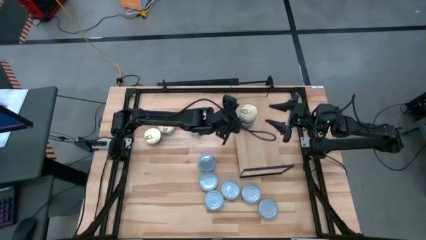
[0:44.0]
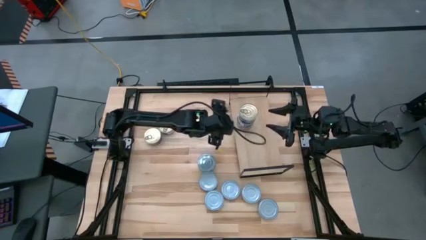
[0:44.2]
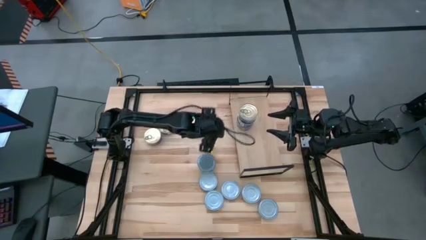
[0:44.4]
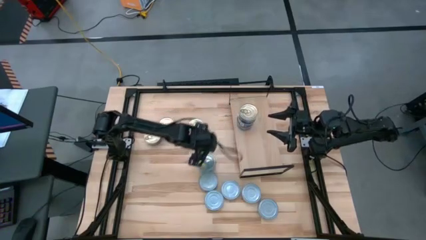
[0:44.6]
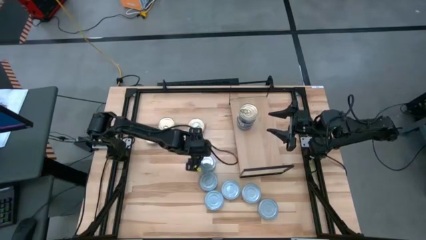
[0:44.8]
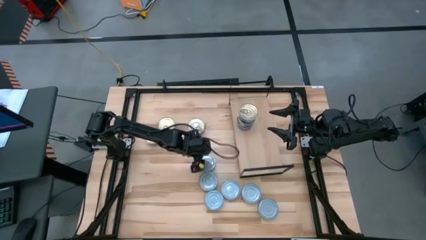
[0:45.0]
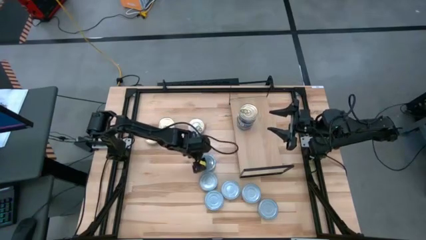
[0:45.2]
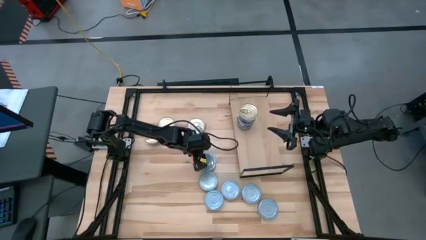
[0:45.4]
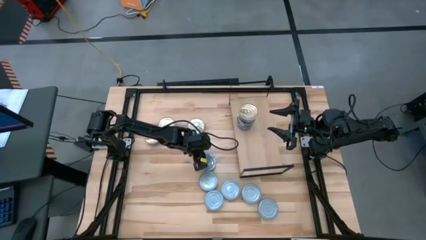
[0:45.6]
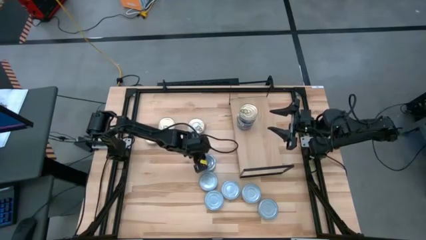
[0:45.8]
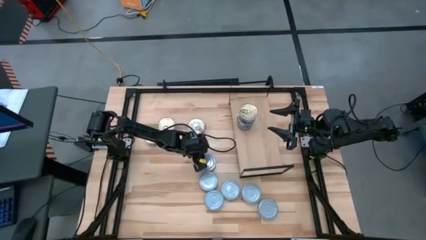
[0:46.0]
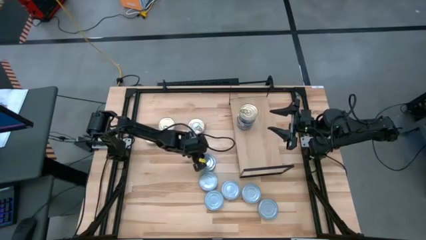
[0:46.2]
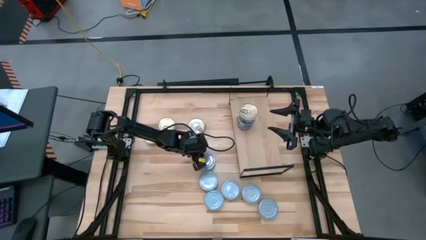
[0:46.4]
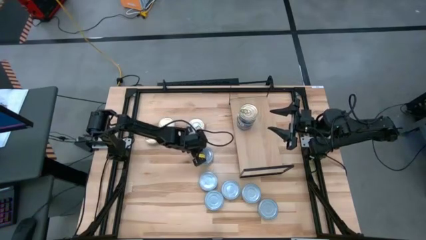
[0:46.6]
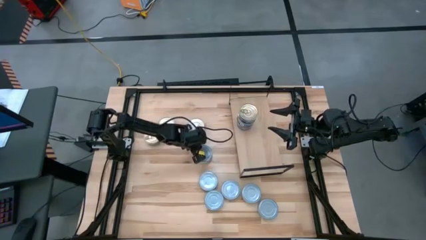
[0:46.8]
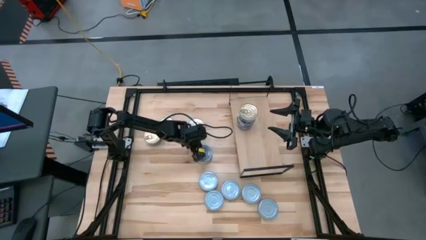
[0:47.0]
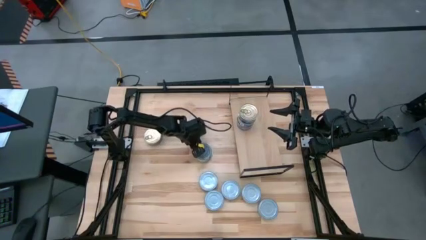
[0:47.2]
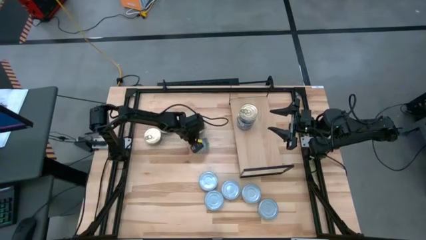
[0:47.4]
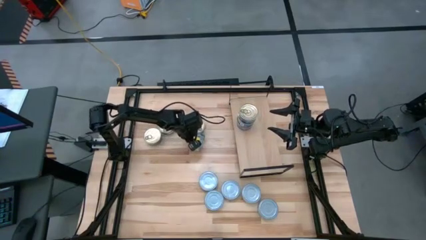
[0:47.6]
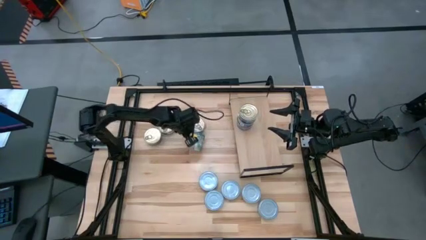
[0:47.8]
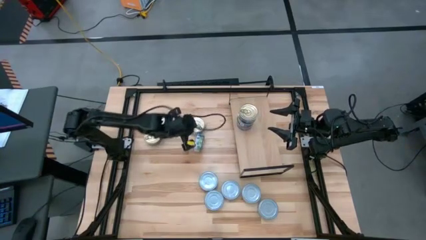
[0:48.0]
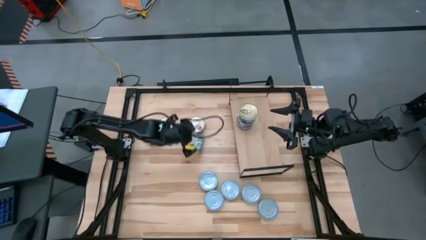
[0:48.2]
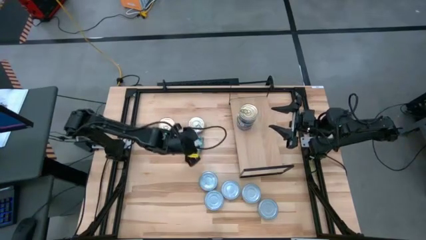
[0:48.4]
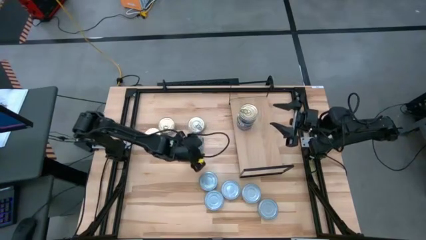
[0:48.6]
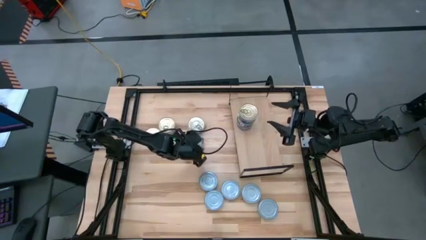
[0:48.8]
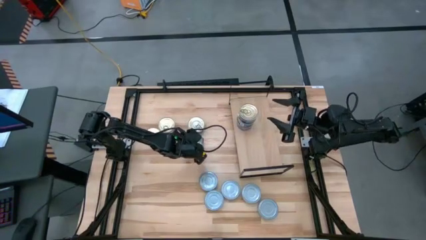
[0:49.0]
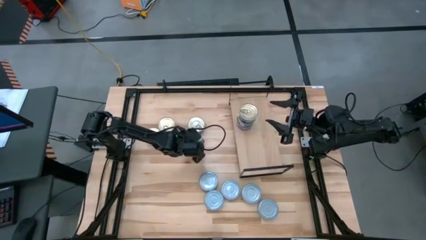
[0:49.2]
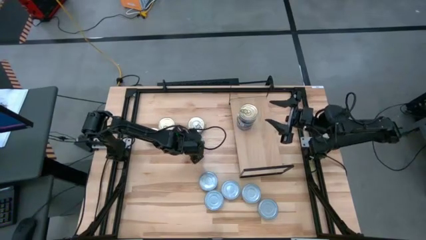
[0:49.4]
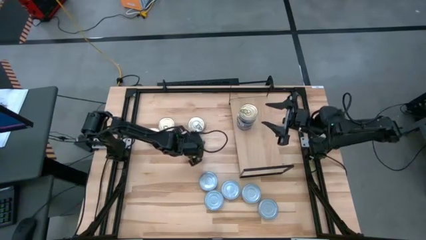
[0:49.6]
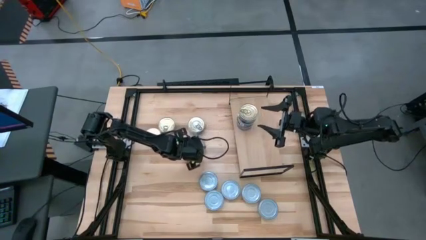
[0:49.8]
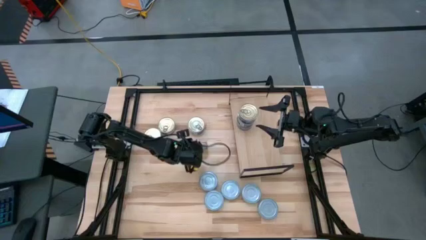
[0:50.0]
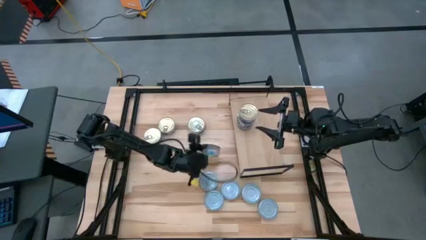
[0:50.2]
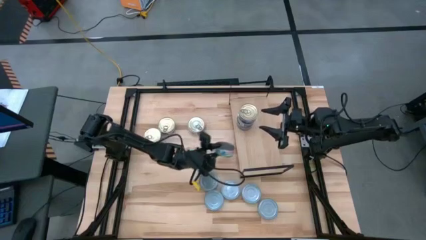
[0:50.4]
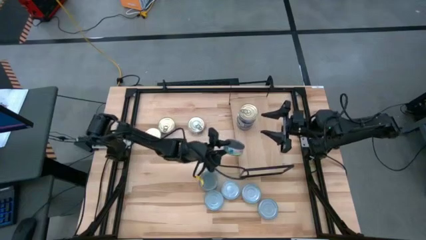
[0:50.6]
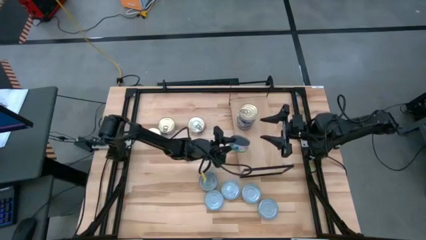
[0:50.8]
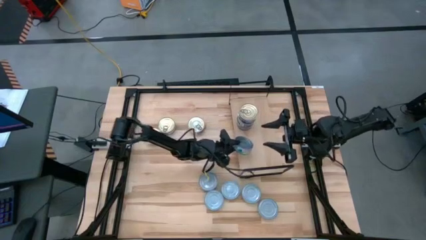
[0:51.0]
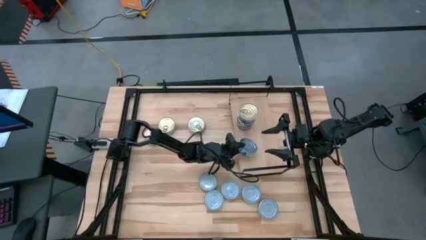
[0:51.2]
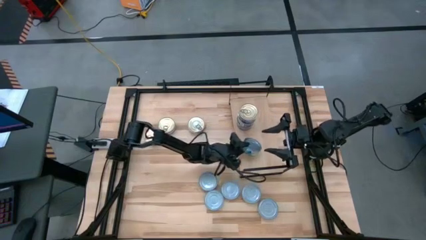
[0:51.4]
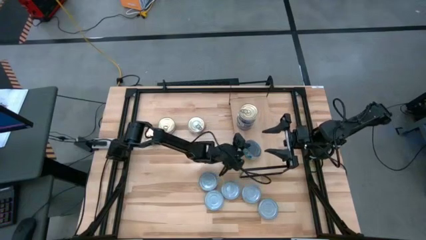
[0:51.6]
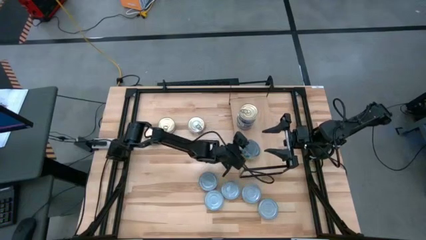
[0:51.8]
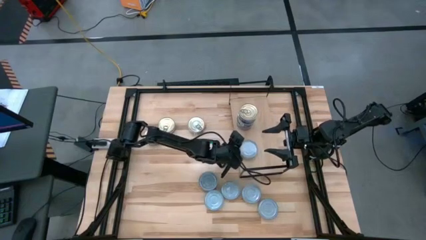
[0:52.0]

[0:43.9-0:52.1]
Task: Stack canned seafood by type on shelf
Put the green tuna can on the shelf
